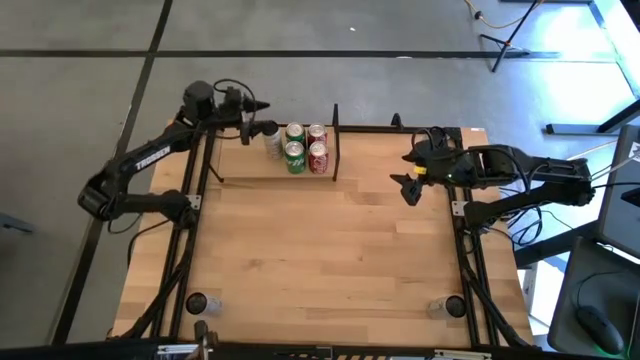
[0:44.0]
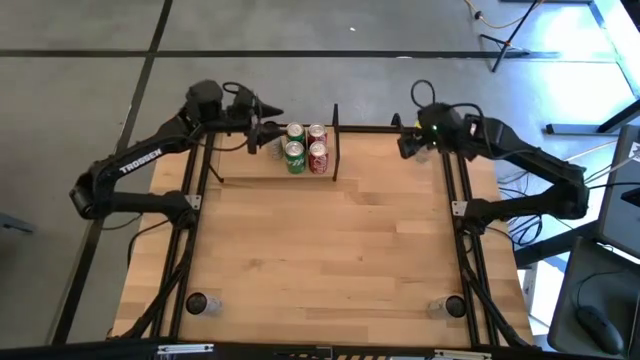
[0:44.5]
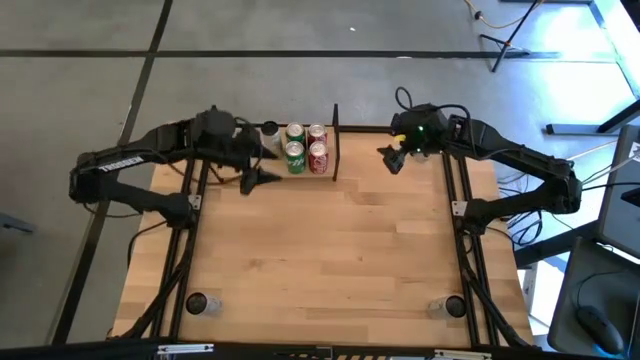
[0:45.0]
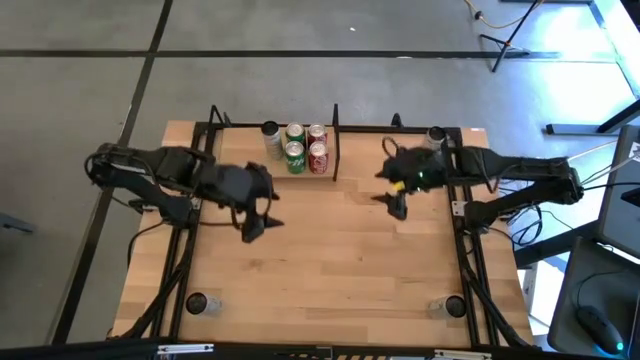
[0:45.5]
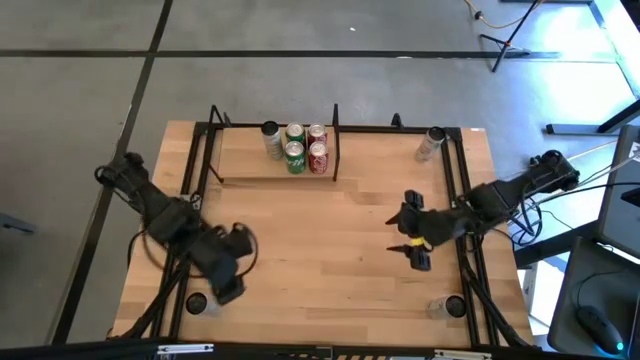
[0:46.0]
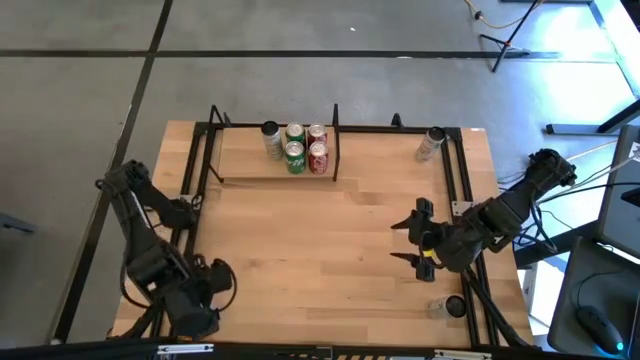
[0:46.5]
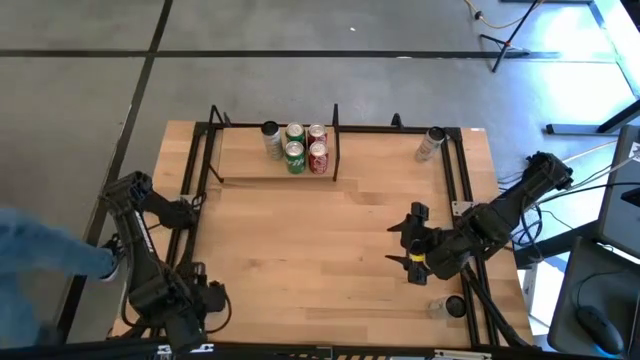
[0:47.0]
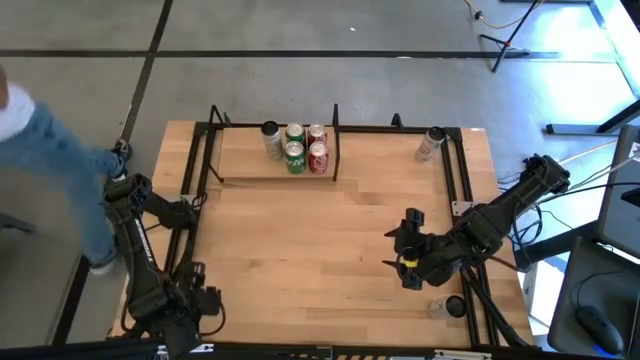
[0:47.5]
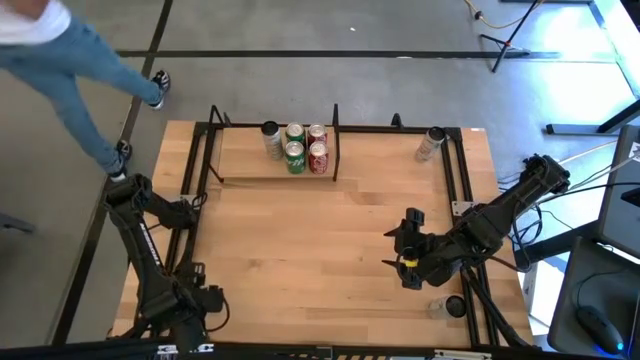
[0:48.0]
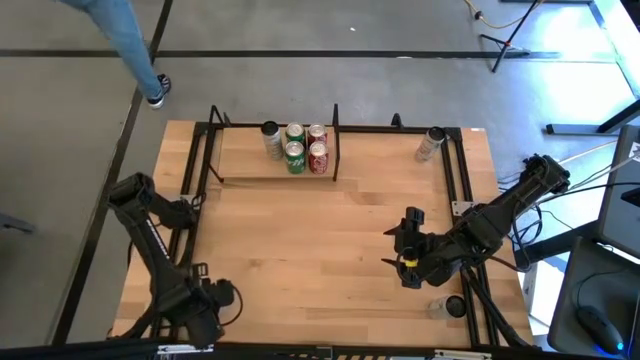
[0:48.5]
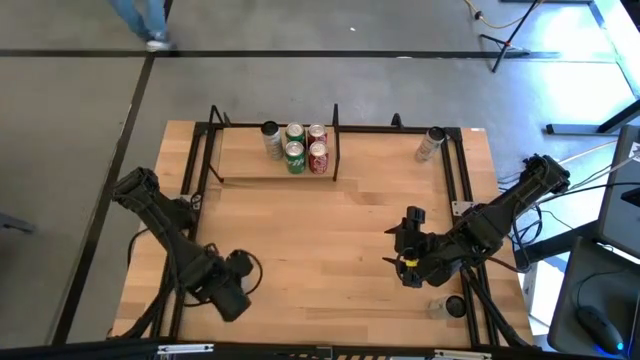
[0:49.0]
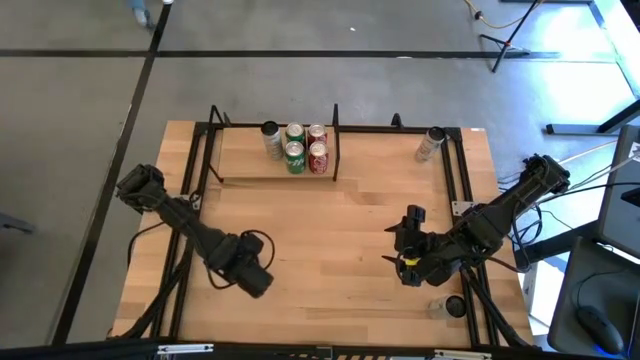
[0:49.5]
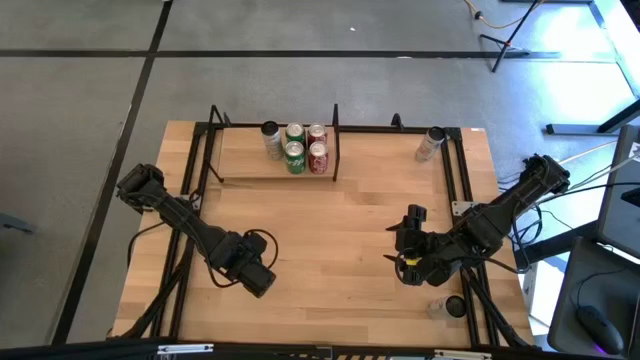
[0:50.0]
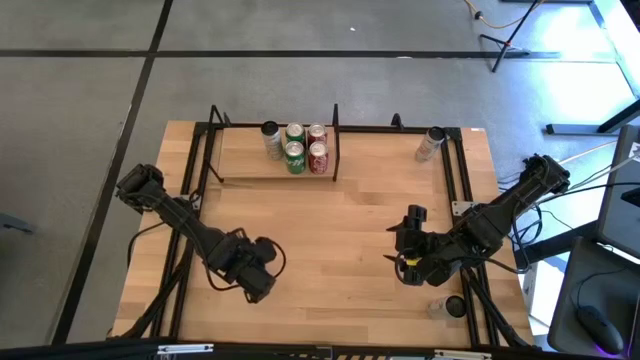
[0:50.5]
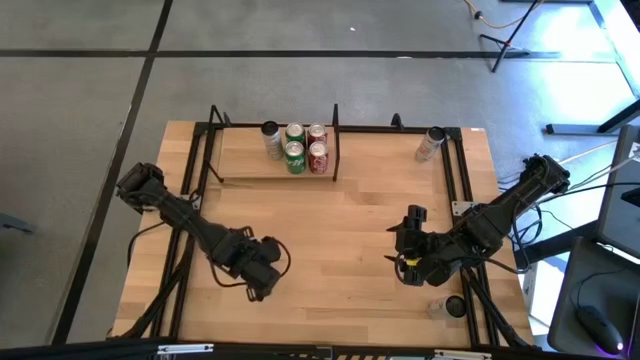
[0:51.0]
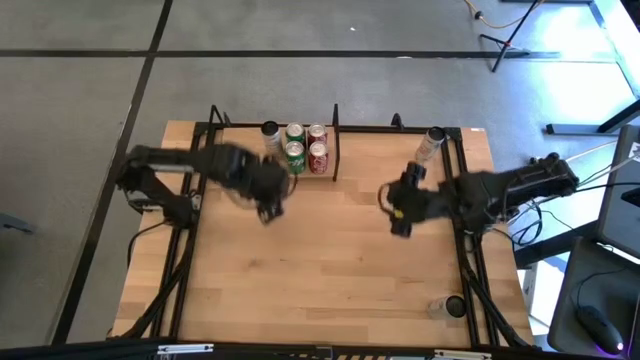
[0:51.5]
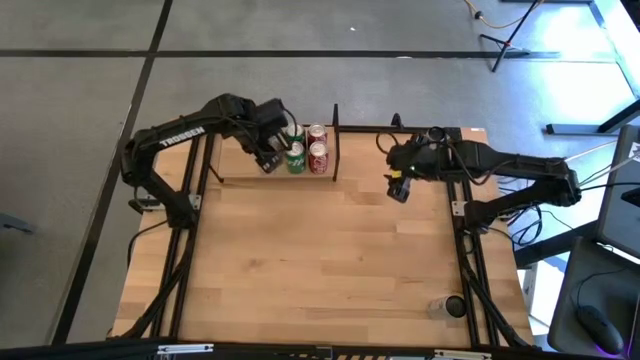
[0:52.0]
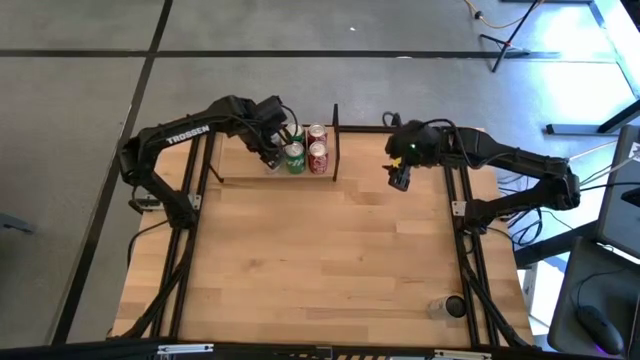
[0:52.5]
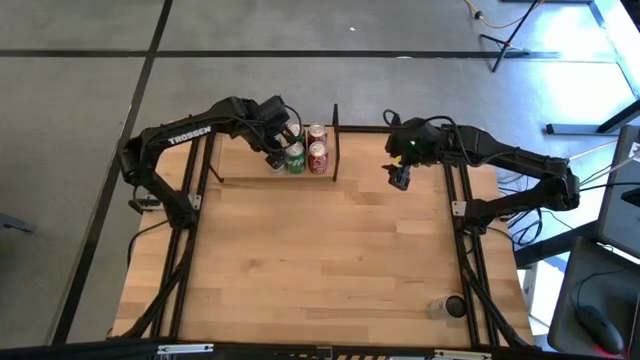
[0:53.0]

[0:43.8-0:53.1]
Task: Place canned beverage on shelf
Put the right white-yellow soda can on the shelf aligned with the other white-yellow soda can

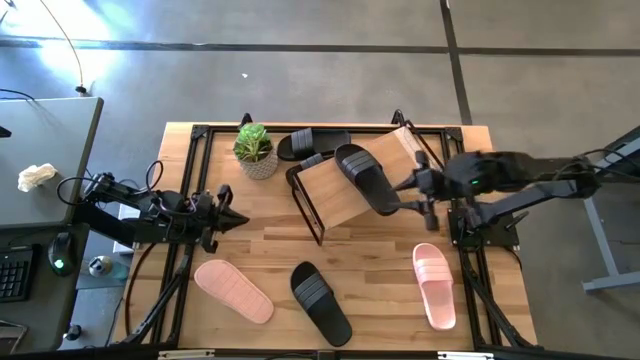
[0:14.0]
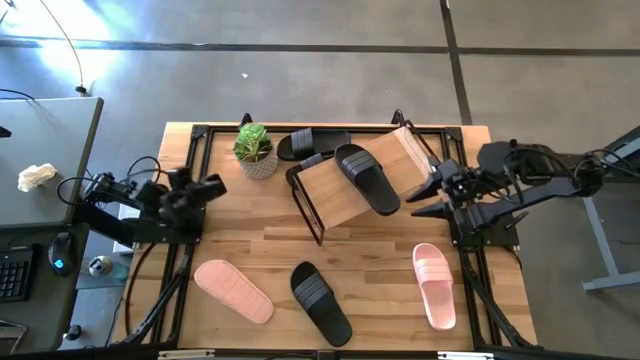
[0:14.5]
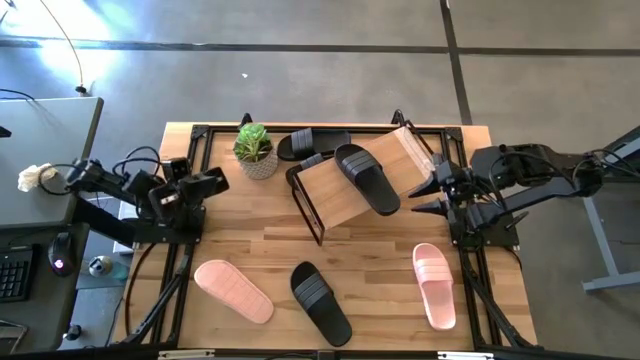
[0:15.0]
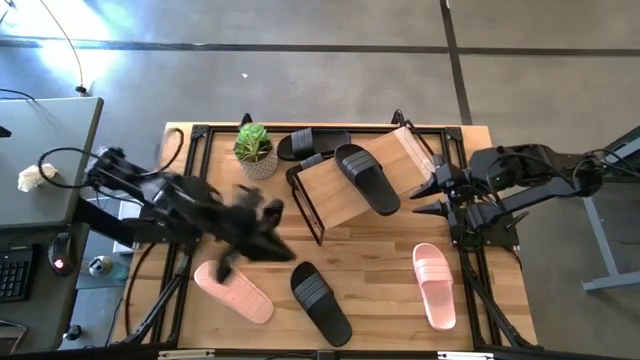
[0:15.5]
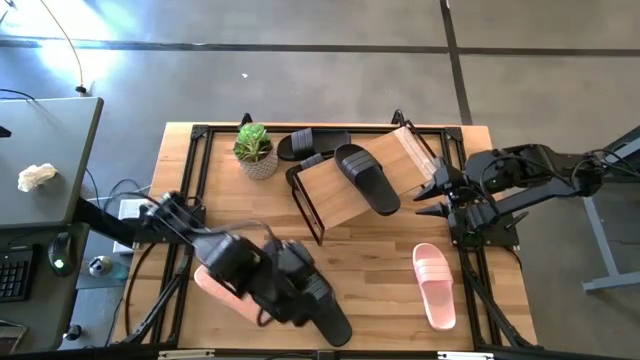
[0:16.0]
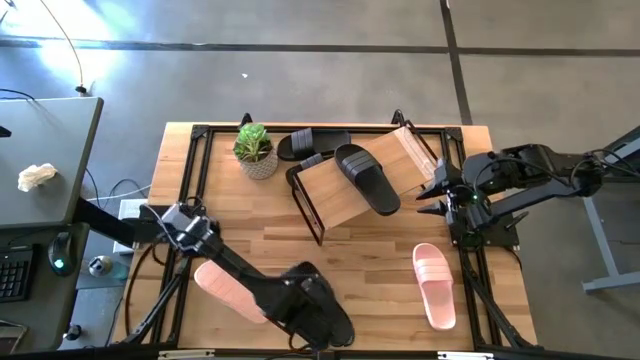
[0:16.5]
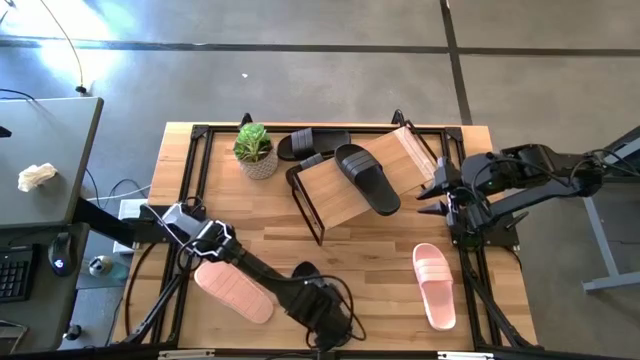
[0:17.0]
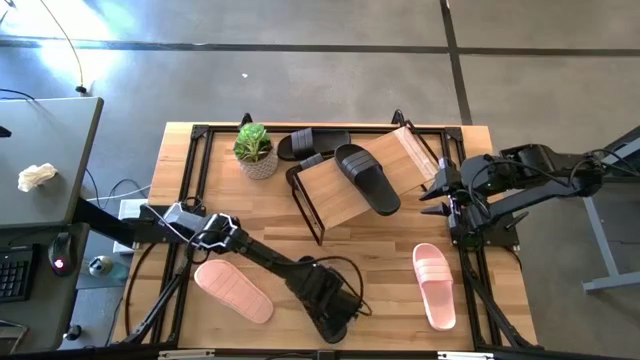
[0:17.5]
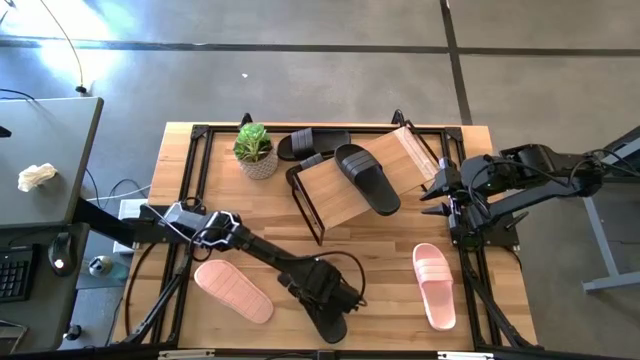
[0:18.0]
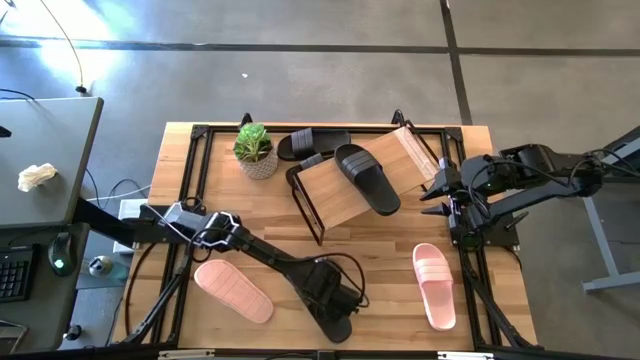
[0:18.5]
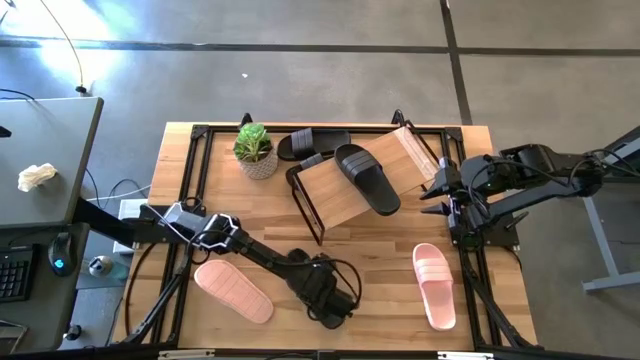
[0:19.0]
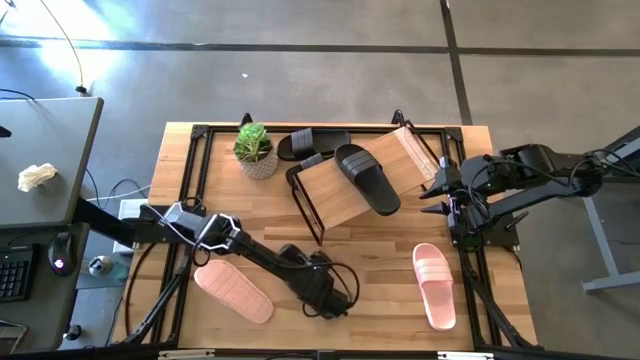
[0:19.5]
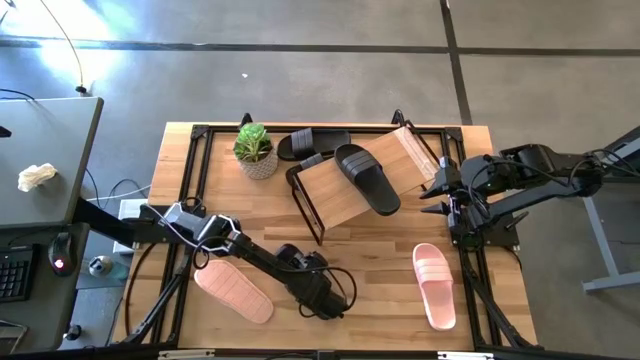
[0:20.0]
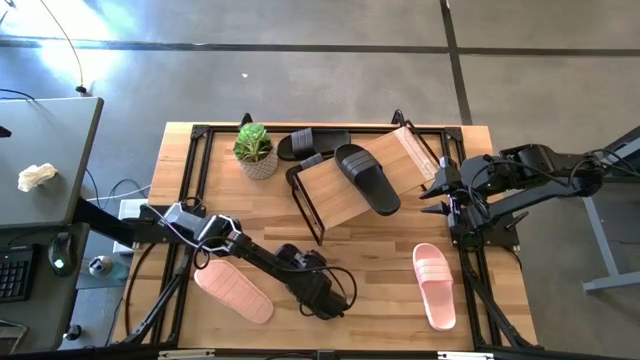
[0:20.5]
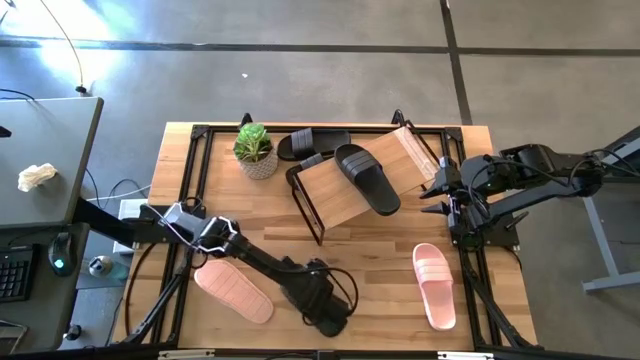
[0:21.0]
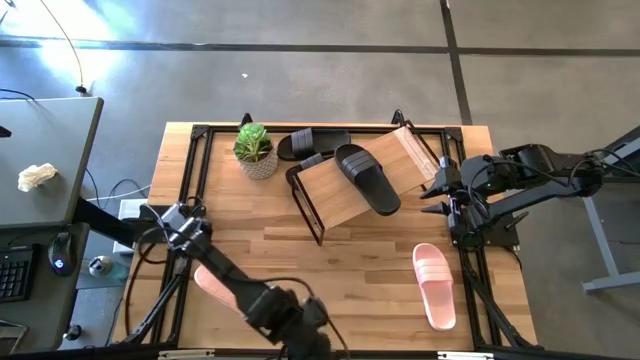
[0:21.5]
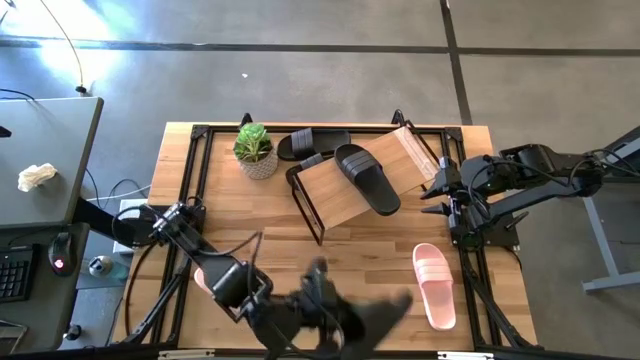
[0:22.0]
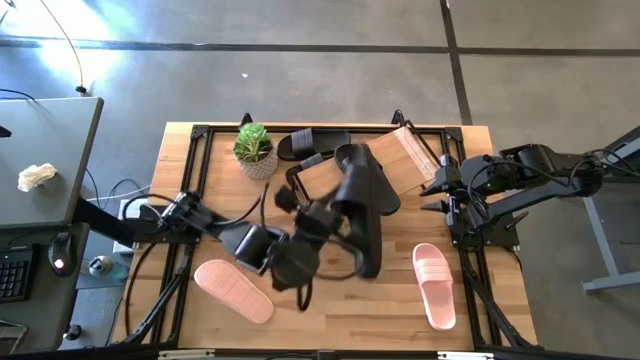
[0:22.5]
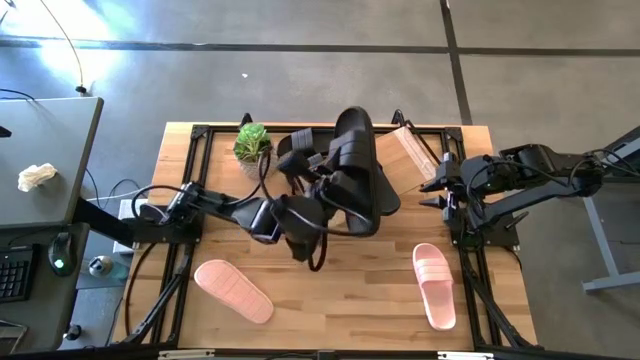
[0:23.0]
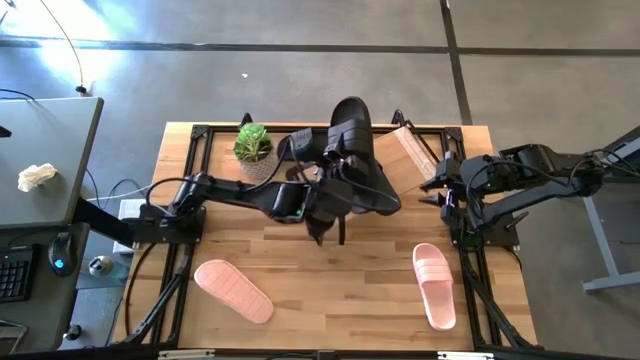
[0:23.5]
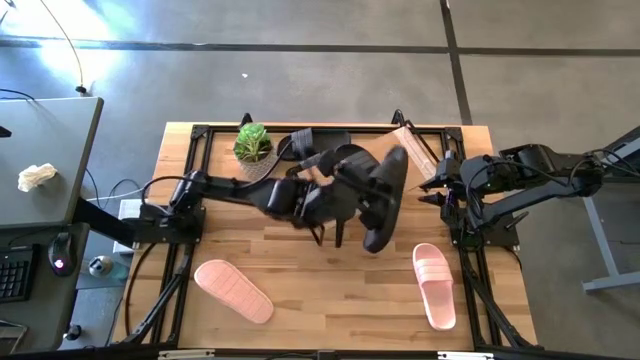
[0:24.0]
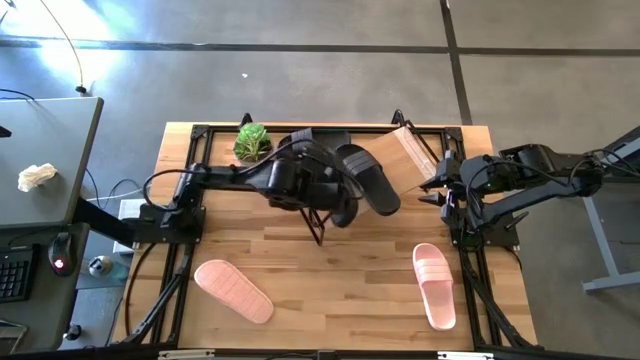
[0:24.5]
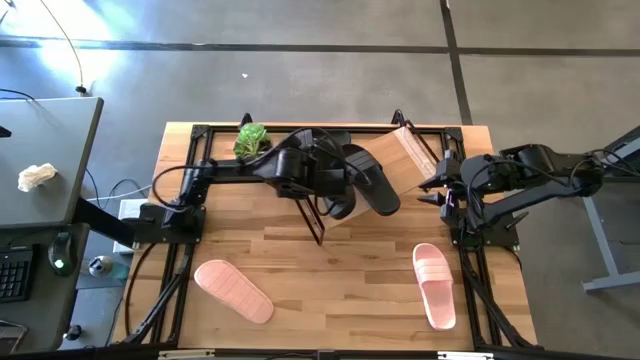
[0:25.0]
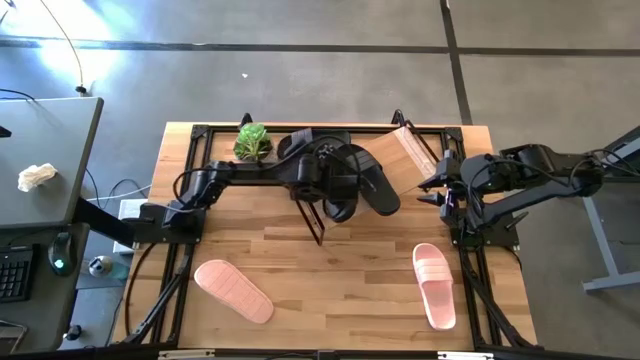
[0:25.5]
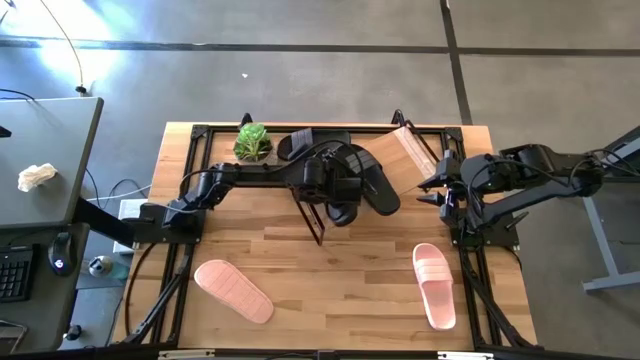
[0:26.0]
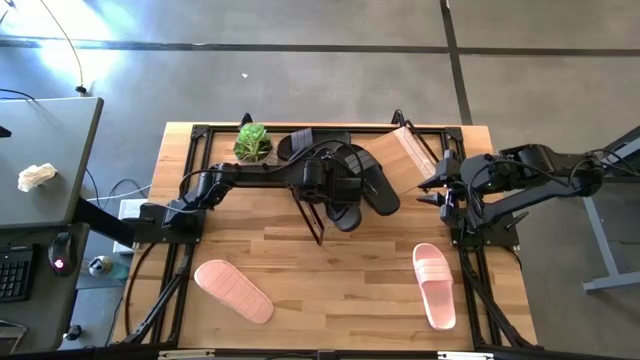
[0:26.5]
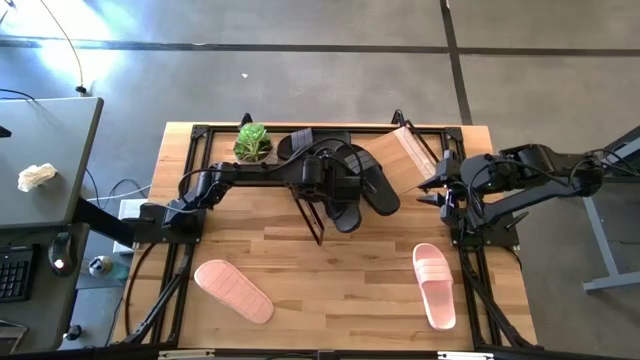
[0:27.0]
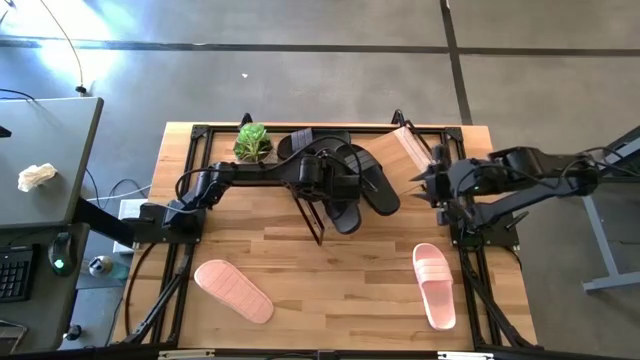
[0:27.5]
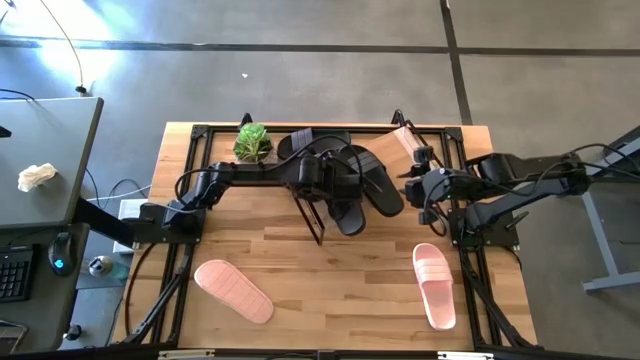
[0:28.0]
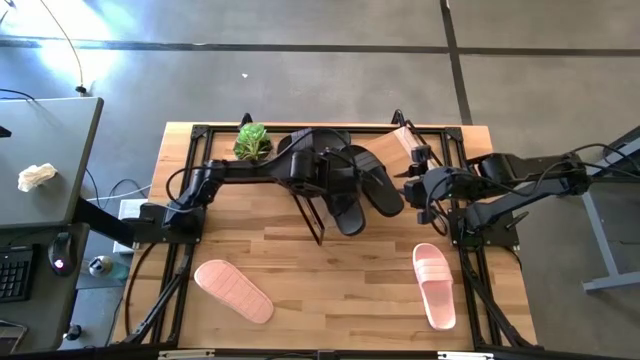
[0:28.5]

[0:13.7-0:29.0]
Task: Pick and place slides into the shelf
Put the bottom black slipper on the shelf
